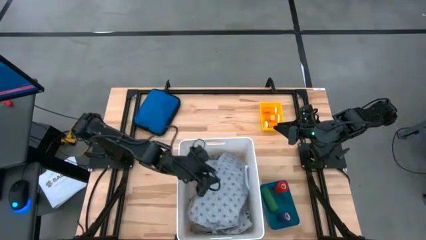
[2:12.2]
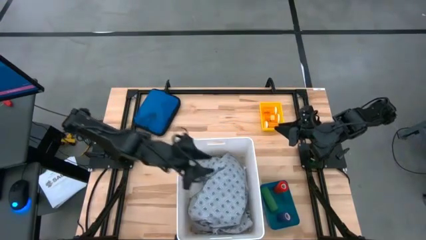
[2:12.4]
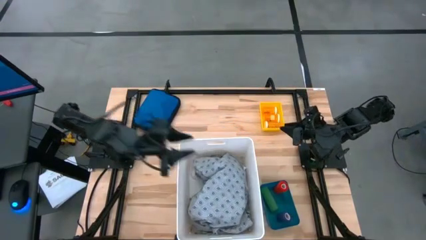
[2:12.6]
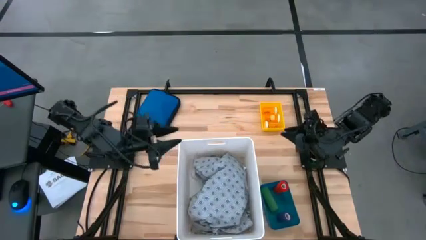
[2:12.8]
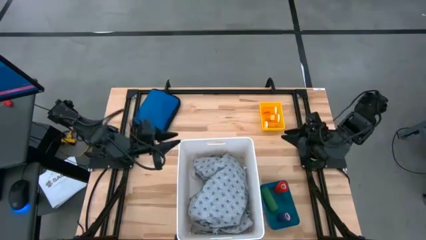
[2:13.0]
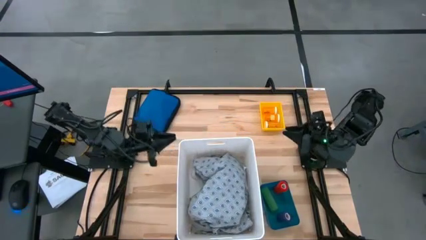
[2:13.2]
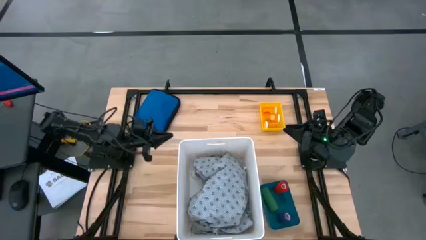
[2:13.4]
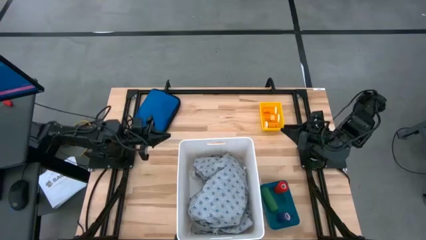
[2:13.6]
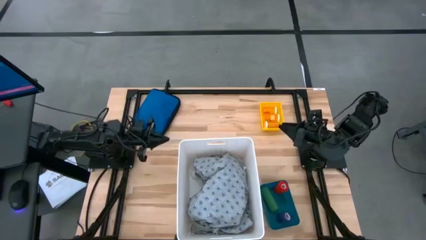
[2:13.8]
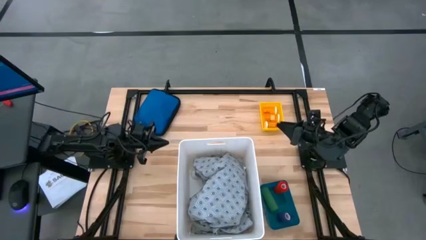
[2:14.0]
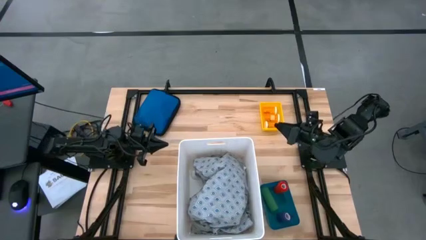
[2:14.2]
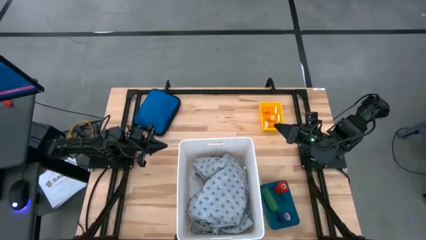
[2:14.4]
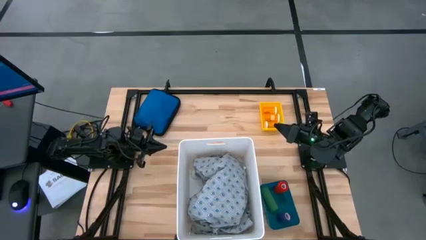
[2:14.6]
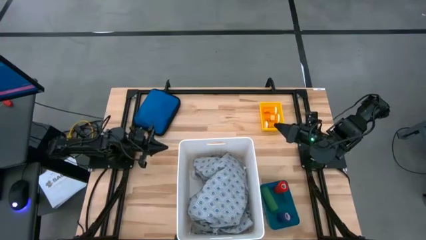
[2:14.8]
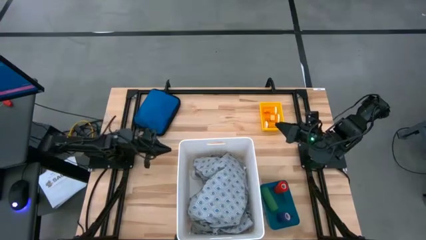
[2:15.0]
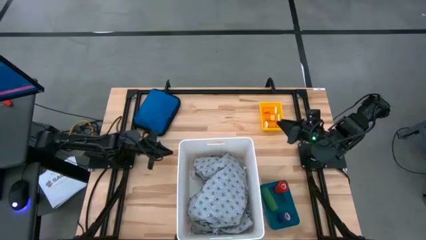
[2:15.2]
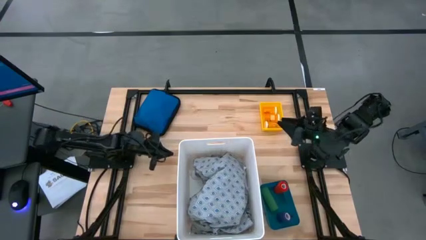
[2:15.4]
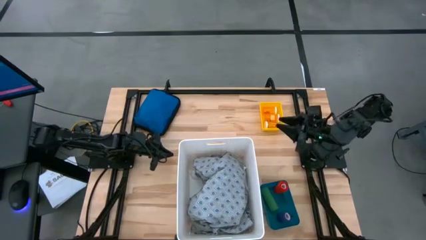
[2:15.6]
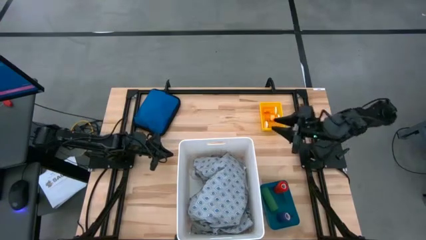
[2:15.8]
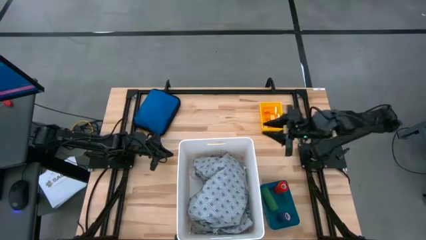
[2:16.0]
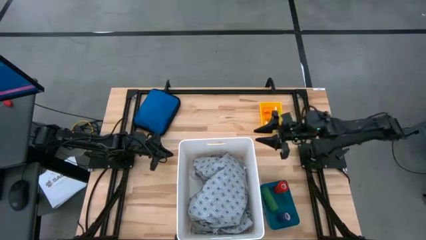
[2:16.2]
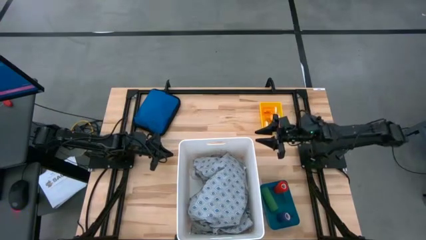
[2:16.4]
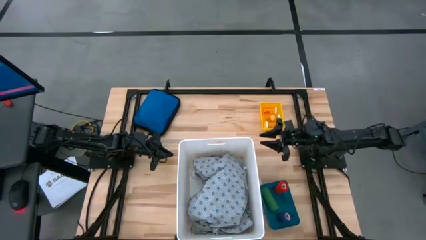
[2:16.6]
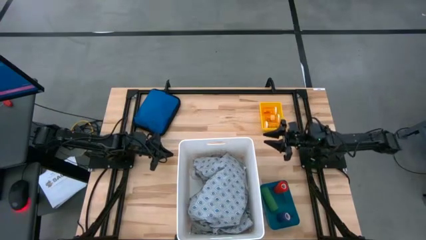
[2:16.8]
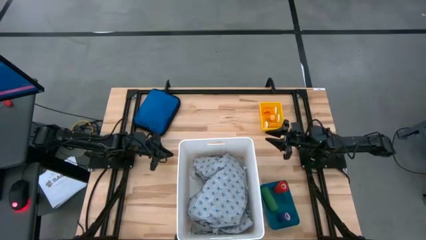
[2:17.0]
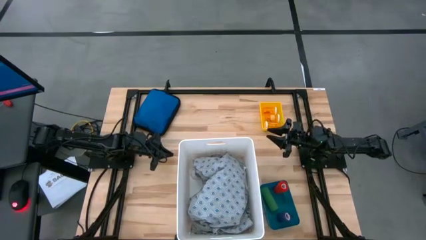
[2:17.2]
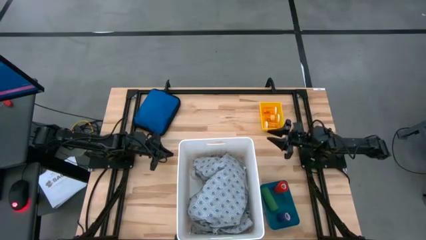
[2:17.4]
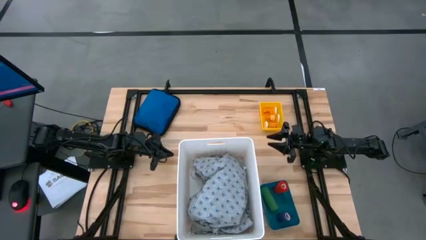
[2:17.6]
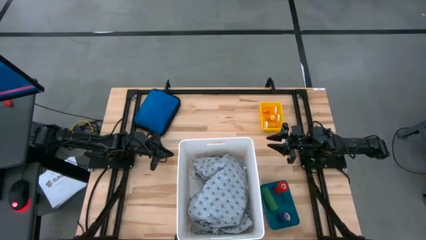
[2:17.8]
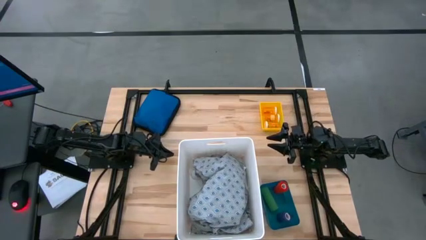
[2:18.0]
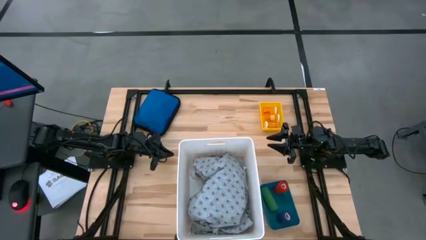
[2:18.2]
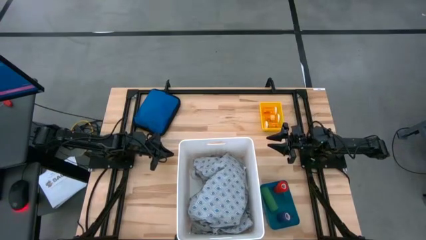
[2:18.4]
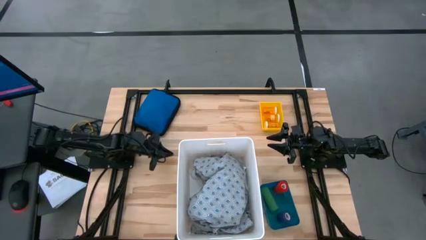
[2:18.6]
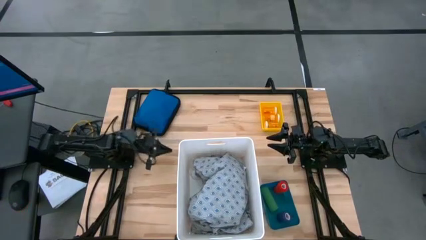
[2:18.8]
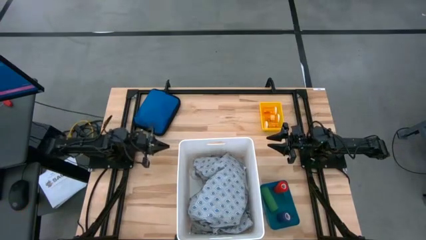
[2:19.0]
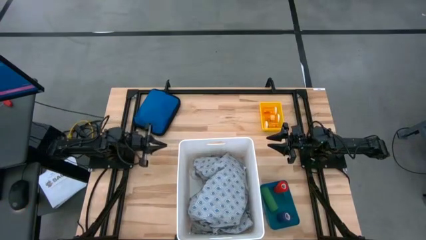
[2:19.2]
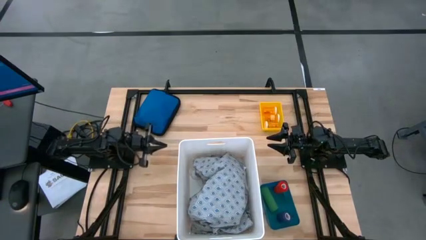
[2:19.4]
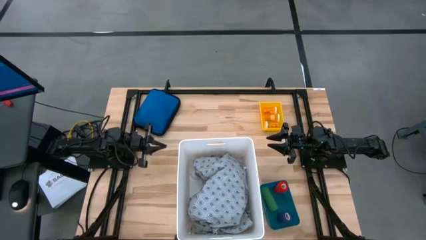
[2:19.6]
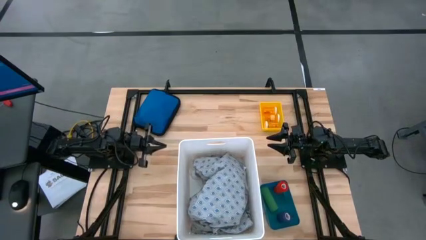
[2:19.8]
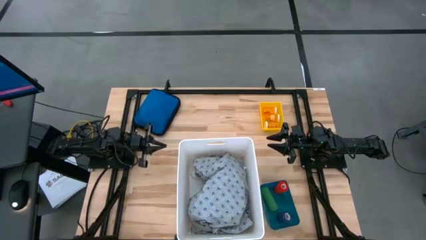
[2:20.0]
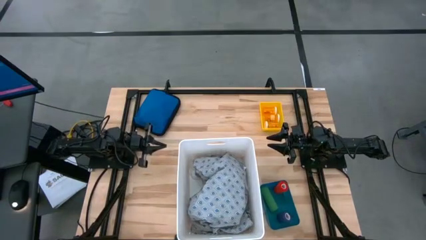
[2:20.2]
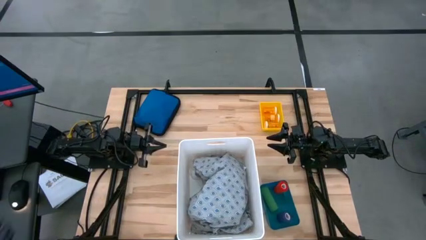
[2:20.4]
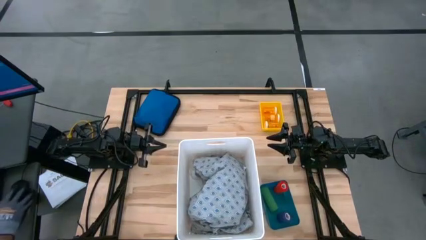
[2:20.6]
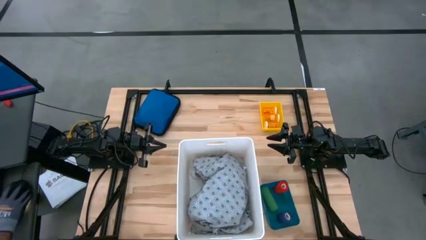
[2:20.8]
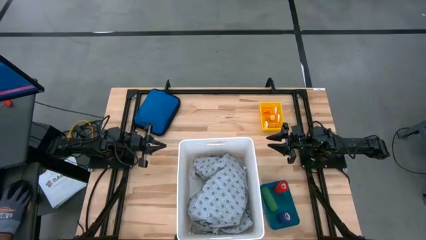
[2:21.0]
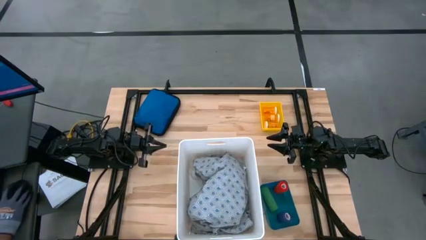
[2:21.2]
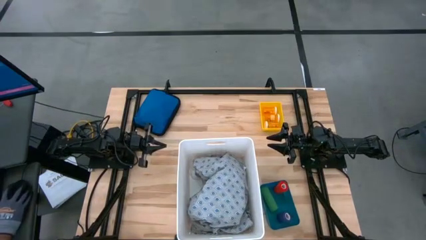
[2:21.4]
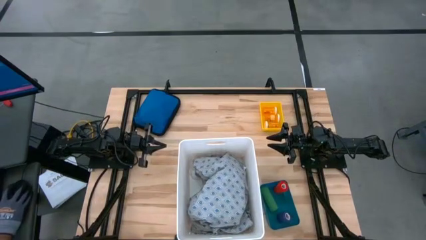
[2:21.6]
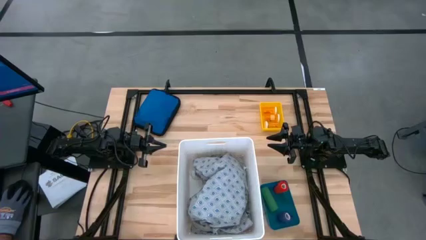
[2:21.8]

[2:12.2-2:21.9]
Task: Pick & place medical supplies in basket/bin
Return to Home Position

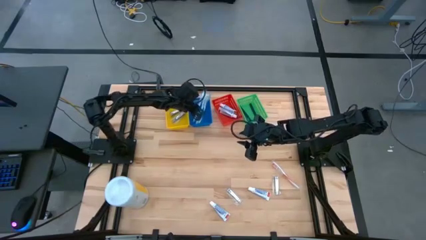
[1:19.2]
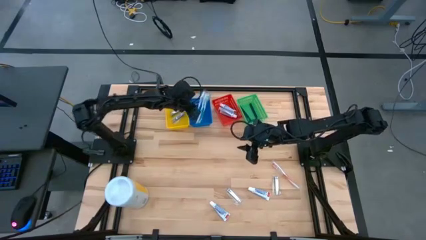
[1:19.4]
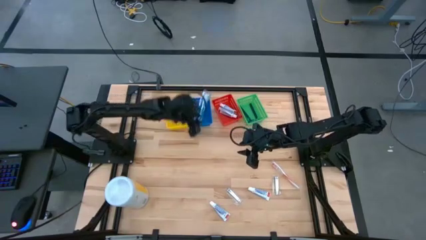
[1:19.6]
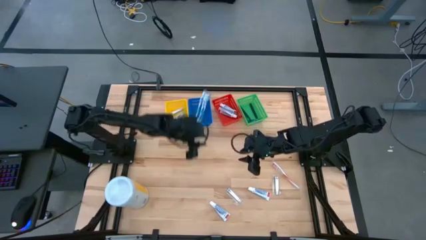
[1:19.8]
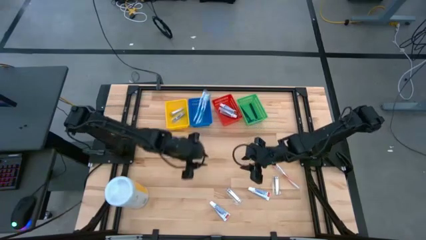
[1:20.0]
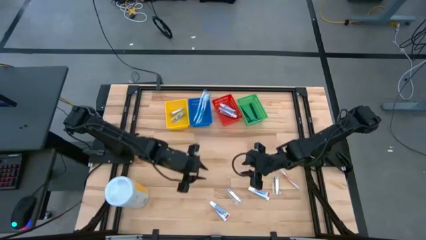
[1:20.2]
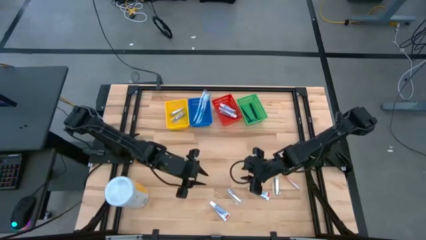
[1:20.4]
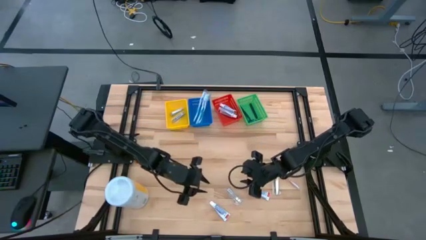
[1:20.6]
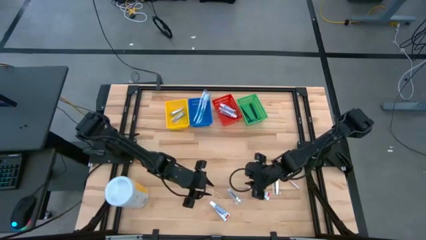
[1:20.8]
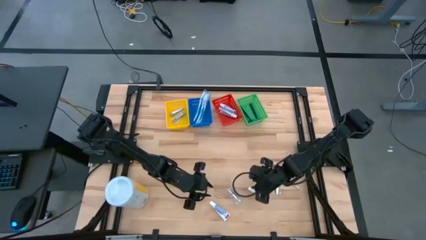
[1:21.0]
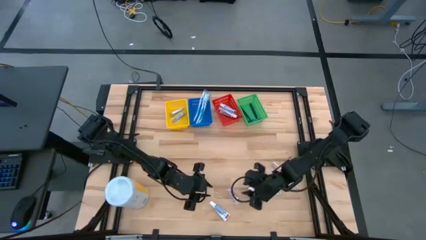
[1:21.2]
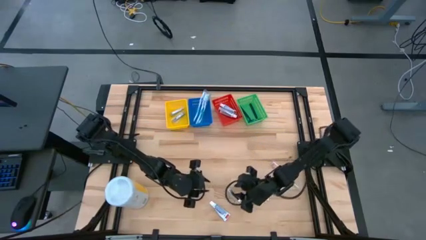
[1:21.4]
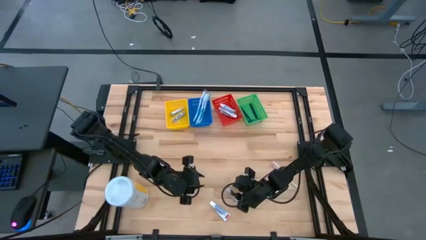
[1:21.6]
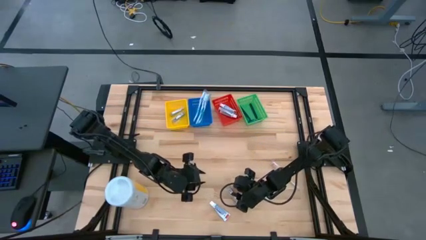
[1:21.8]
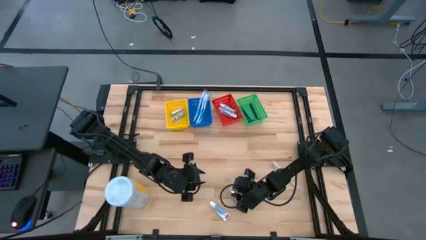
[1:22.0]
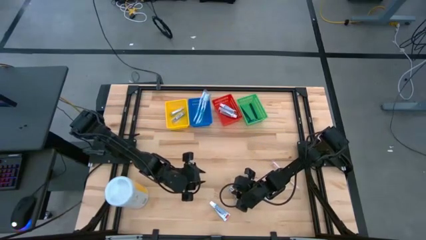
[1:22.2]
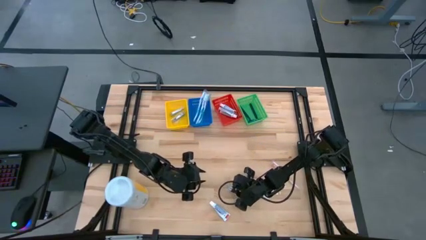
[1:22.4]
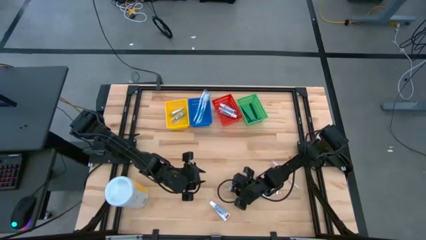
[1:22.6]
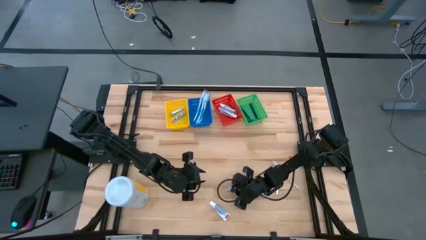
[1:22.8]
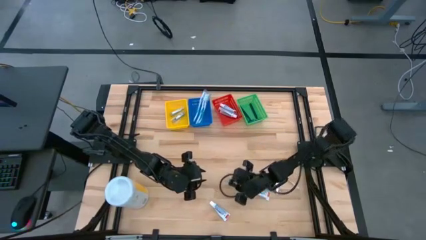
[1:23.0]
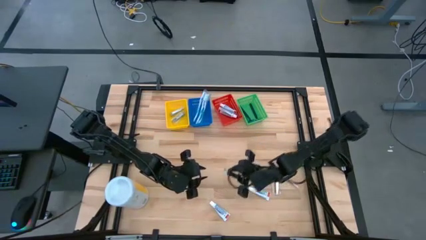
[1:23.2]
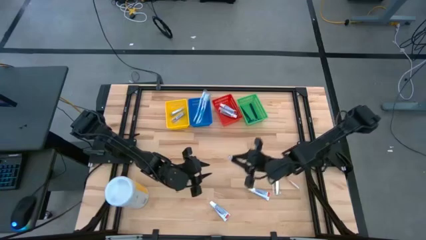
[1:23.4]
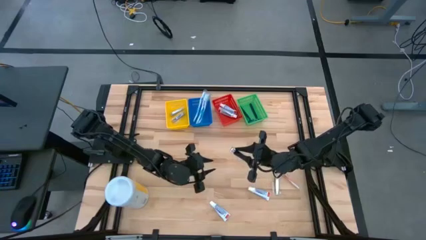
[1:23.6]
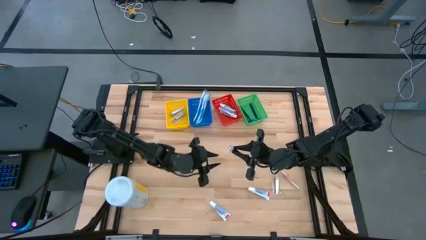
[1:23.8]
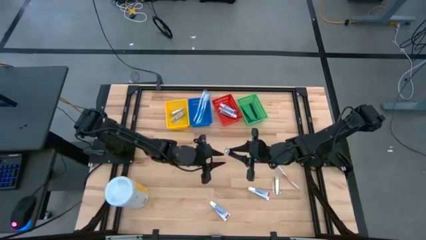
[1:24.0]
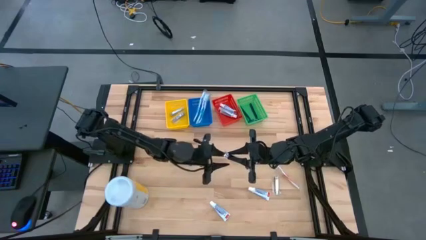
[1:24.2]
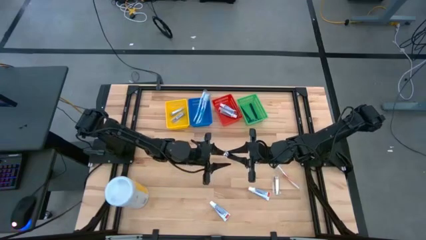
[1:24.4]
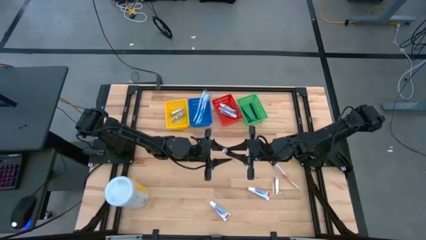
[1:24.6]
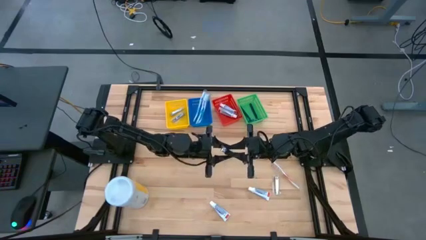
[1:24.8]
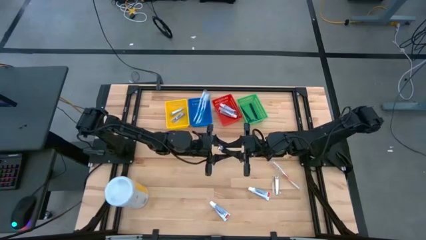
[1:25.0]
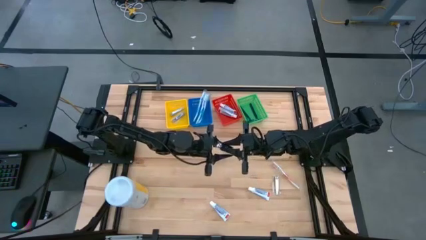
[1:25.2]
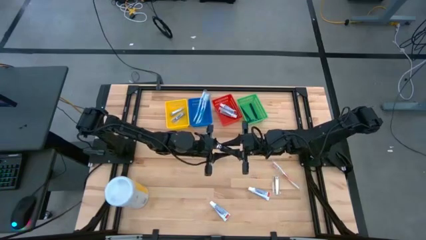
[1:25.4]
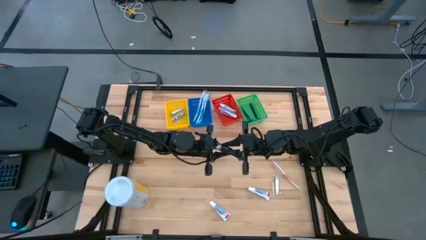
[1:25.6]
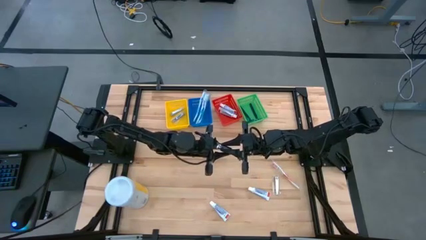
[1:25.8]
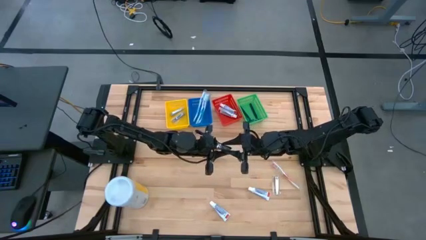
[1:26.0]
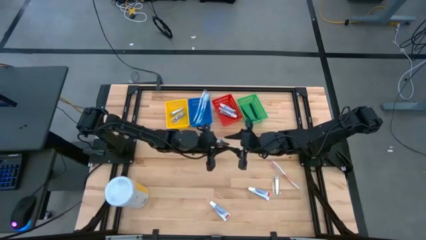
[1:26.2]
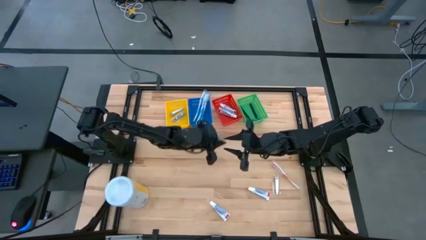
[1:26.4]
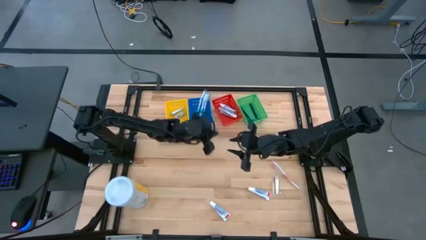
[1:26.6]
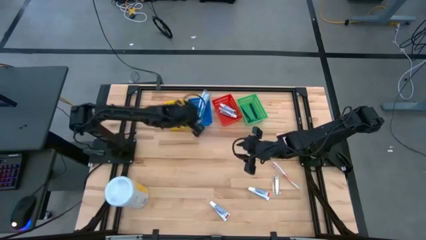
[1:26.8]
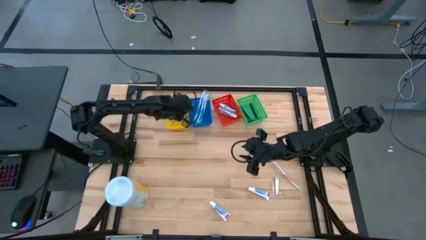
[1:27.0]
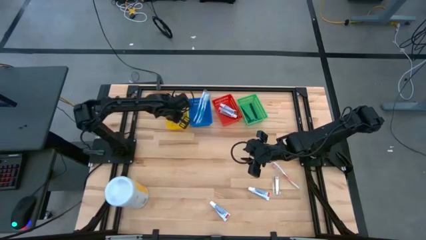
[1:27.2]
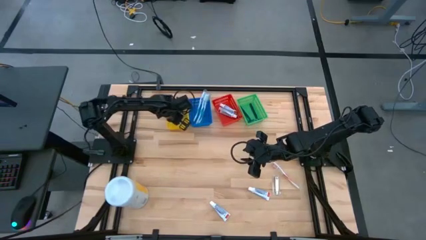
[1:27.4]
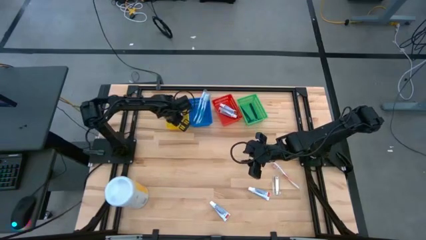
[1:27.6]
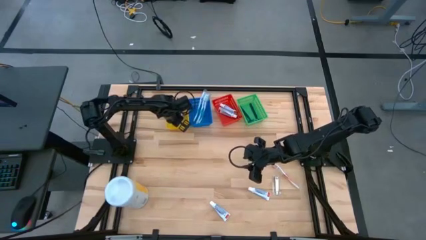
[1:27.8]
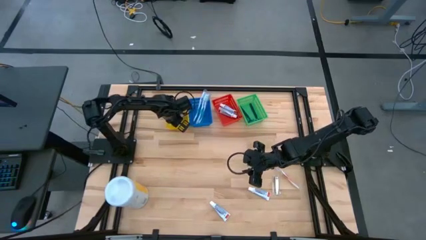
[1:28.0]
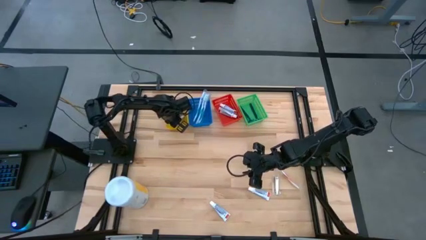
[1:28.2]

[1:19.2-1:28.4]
Task: Pick & Place Travel size toiletries
Put the left nail cutter into the yellow bin
